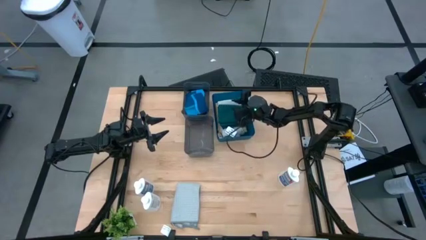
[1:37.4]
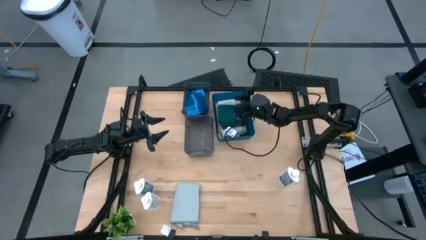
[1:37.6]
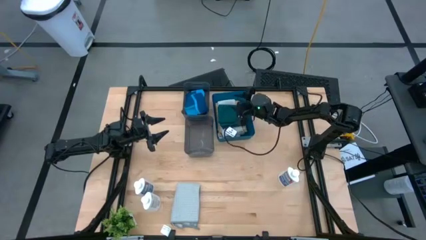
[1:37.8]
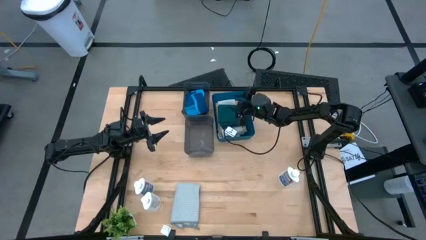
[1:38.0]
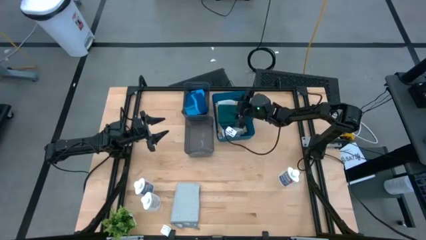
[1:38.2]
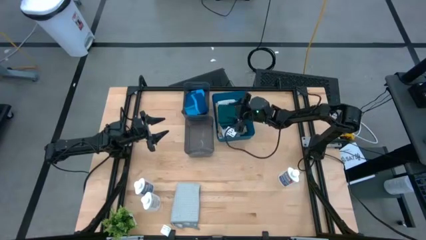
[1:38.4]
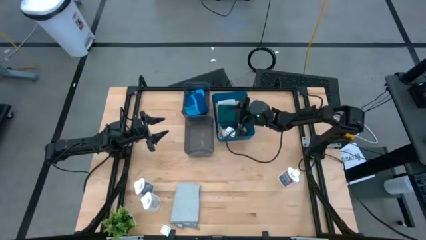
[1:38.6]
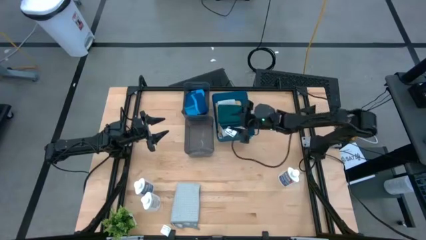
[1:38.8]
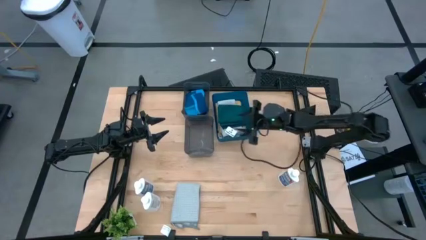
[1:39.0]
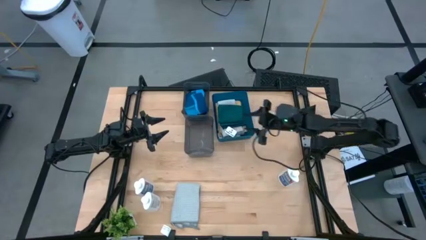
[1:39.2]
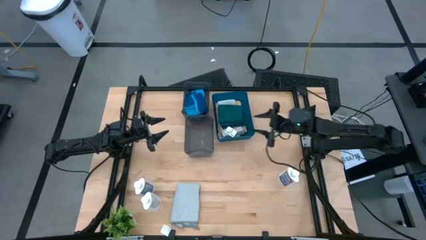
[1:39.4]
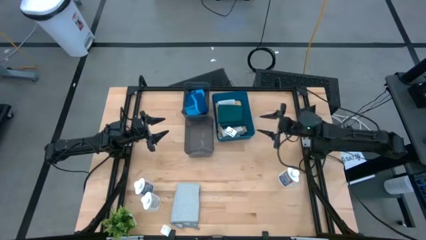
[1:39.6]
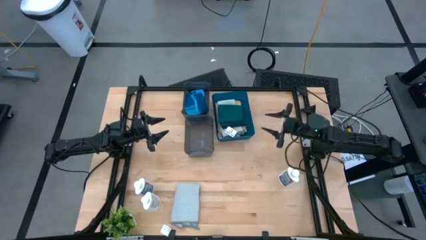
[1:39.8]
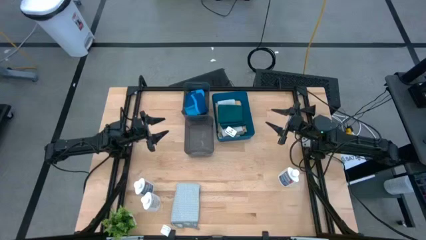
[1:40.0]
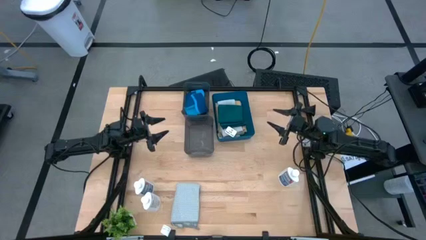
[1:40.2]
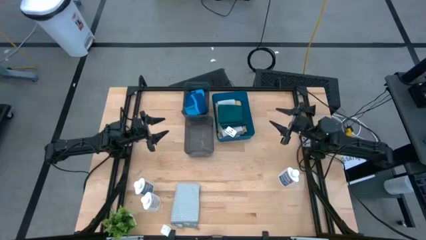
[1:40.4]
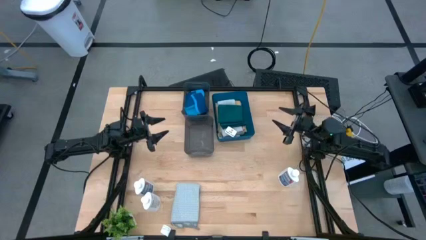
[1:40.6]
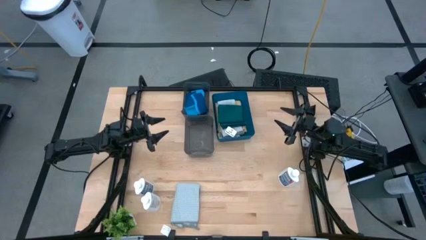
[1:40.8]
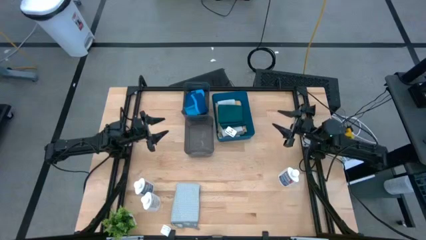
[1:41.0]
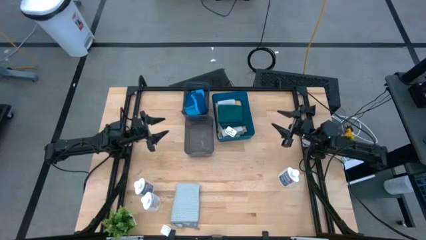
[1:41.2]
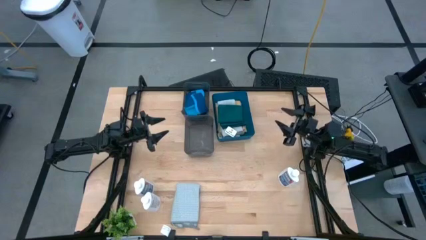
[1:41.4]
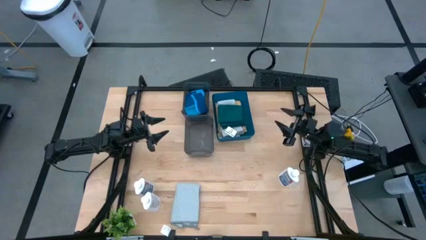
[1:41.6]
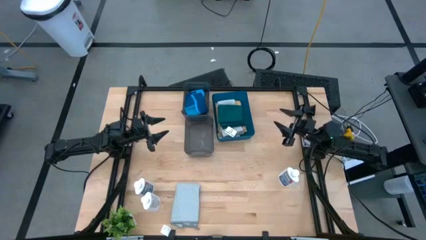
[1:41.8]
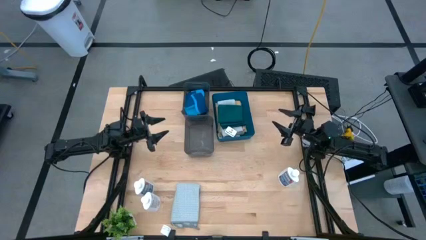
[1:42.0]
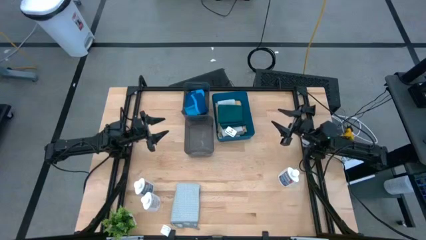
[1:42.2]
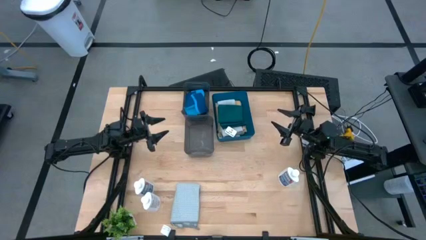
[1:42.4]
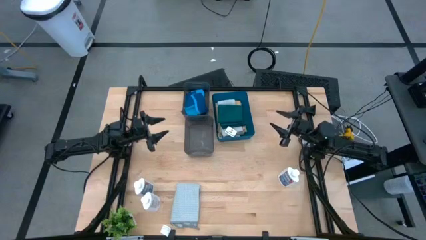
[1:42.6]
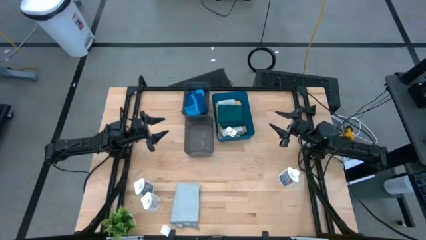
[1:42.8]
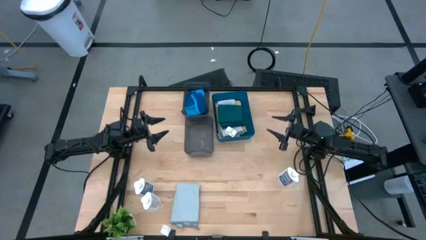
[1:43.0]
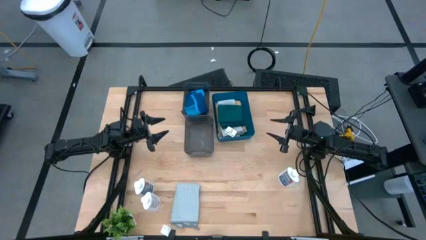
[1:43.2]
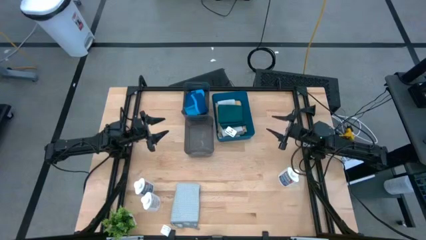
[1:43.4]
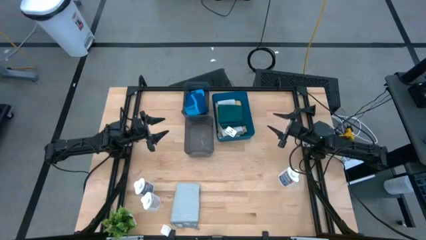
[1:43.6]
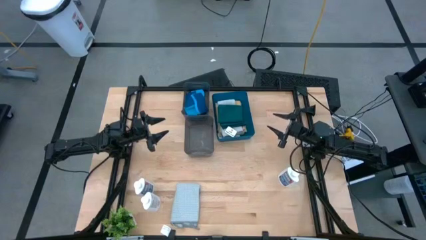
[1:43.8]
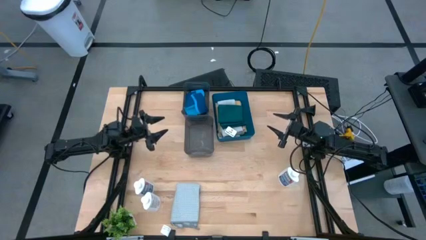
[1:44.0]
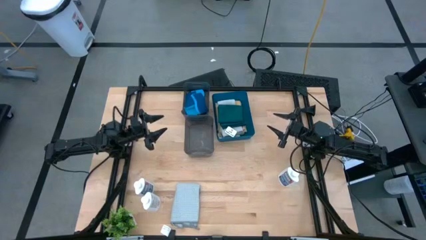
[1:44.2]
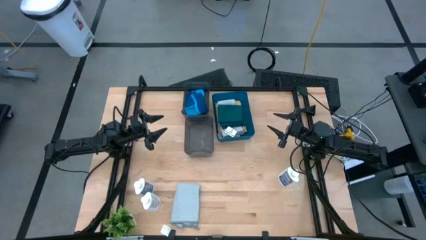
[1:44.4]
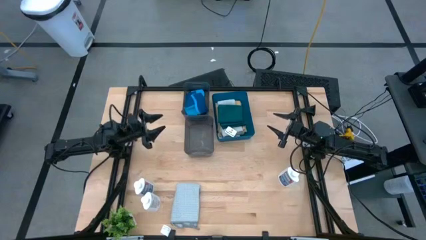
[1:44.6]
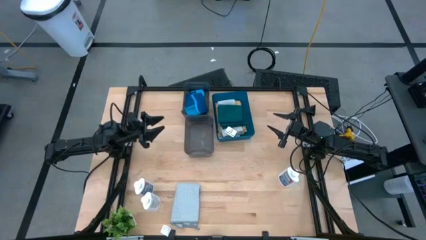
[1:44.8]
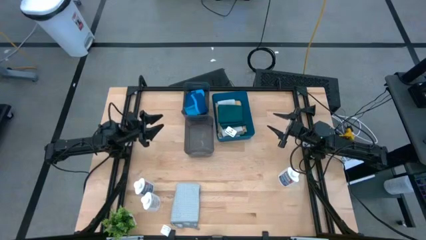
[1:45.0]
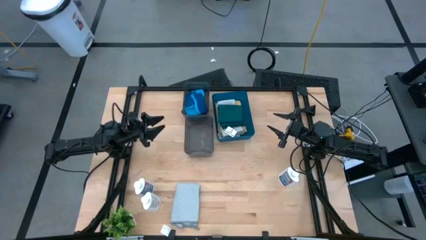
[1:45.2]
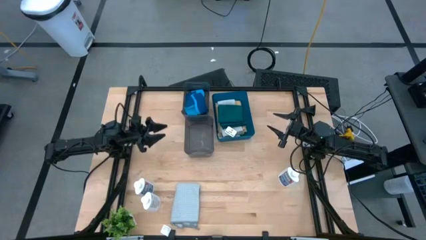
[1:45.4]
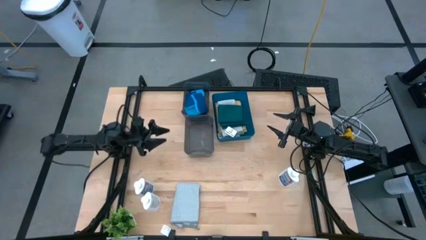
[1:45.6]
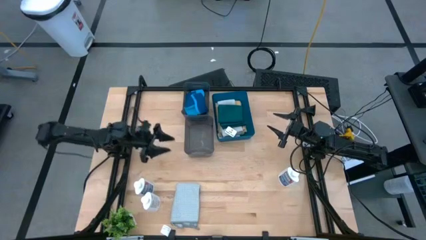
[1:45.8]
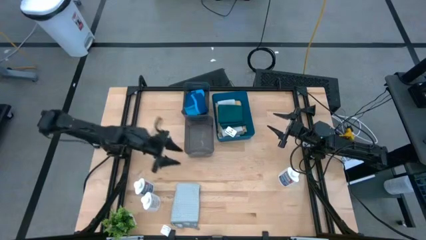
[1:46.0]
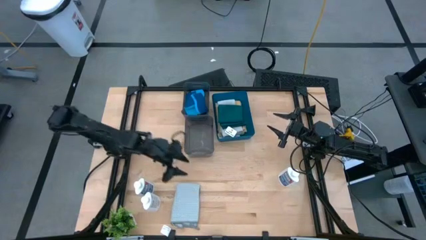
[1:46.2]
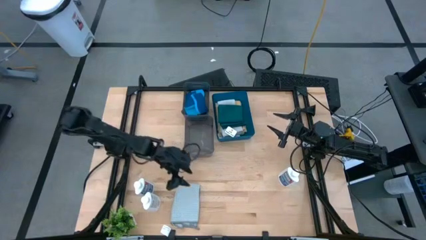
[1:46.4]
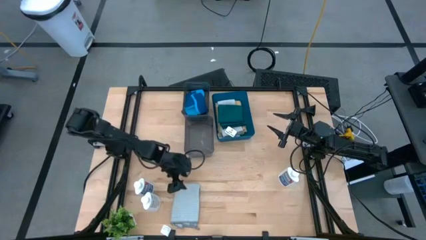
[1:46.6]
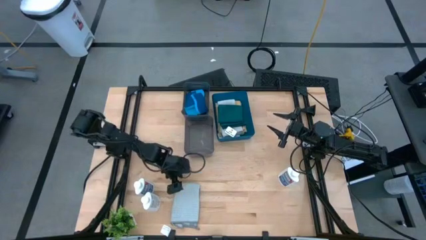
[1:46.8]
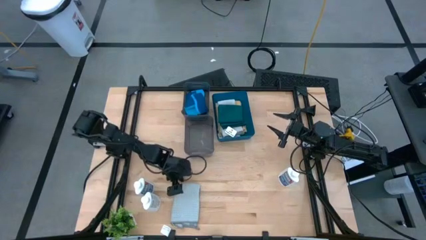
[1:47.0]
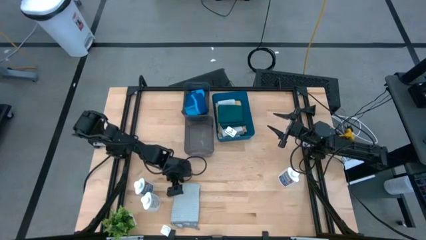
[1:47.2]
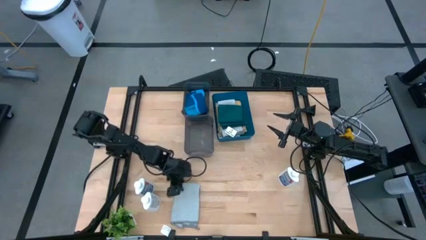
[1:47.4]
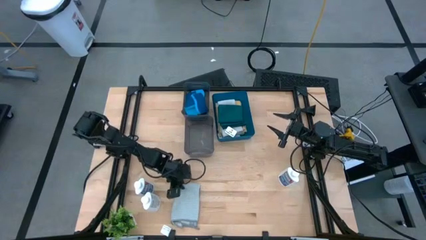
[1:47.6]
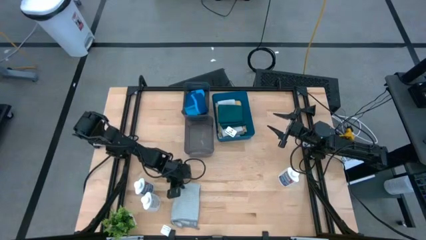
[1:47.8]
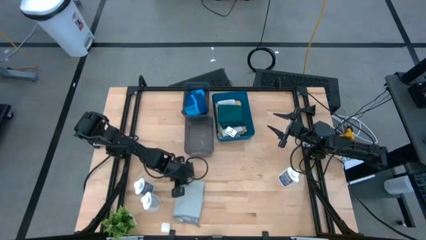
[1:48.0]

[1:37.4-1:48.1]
Task: Pick & Place Kitchen Items
Put the gray towel into the blue bin
